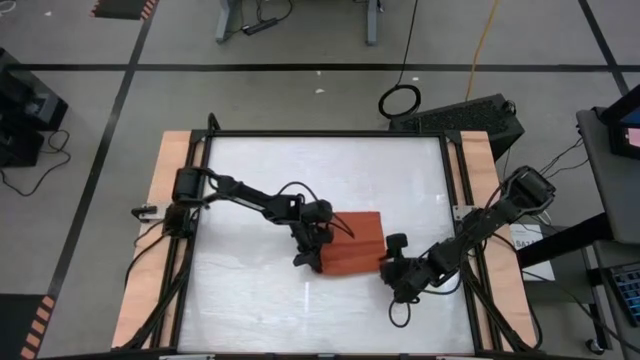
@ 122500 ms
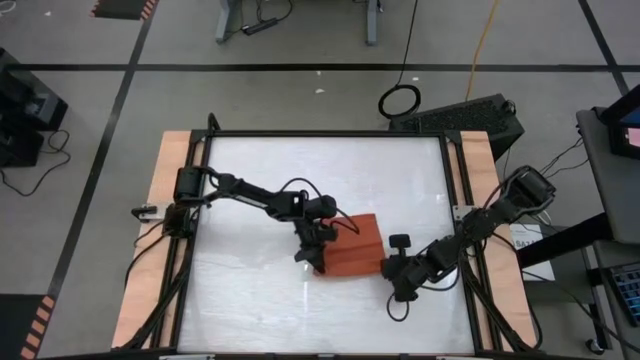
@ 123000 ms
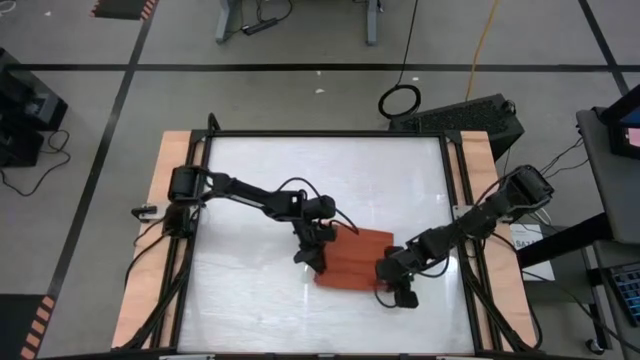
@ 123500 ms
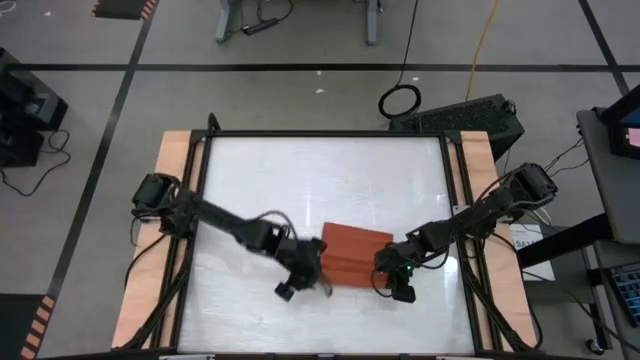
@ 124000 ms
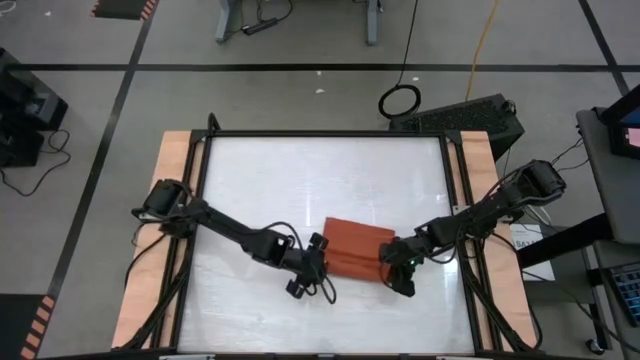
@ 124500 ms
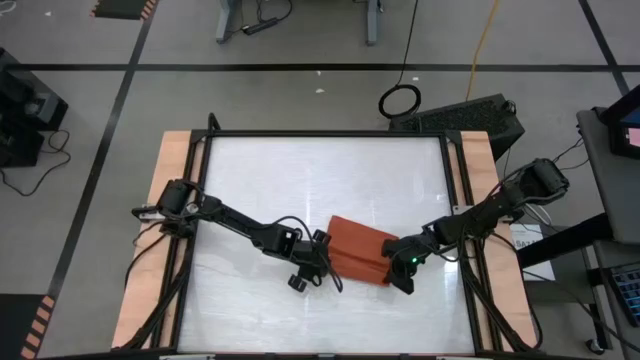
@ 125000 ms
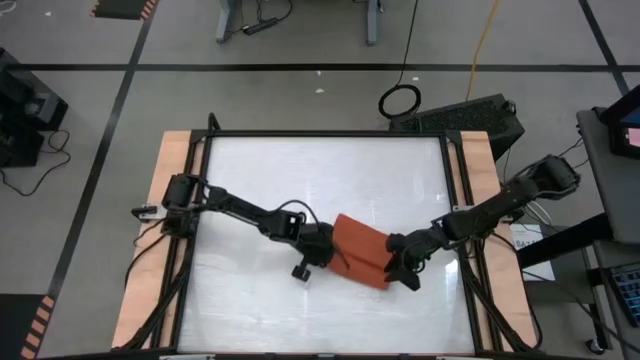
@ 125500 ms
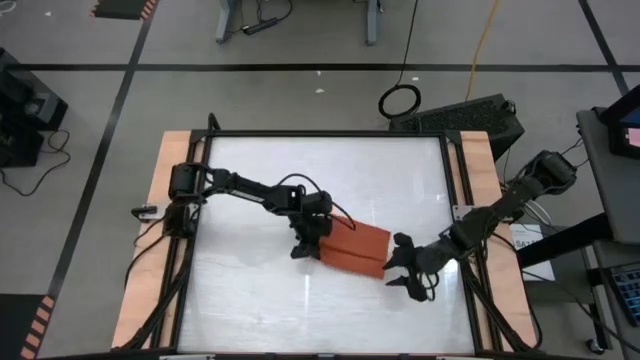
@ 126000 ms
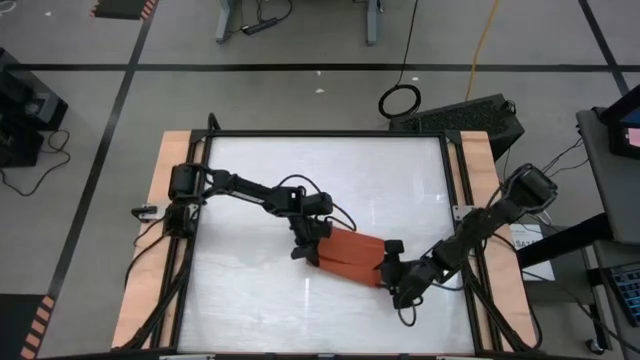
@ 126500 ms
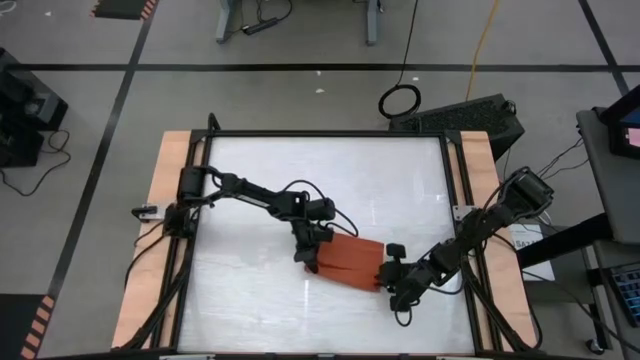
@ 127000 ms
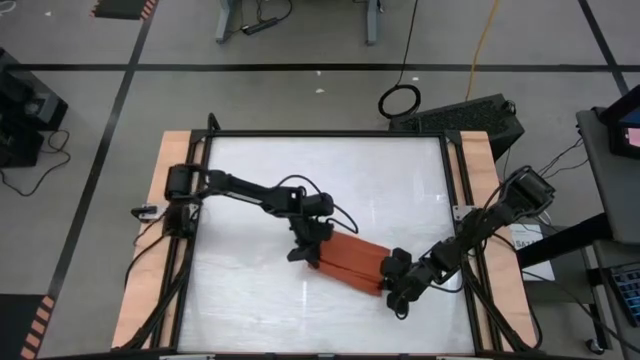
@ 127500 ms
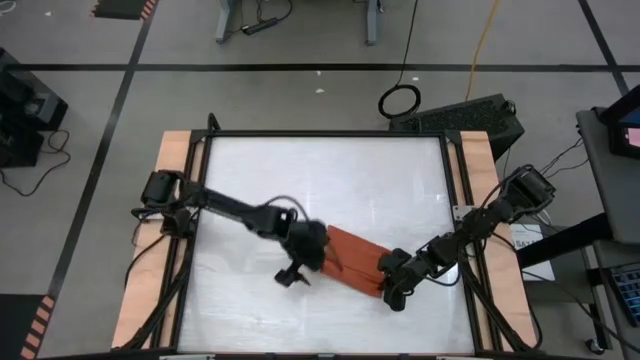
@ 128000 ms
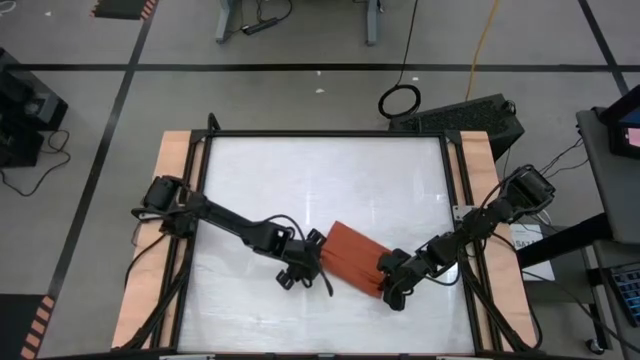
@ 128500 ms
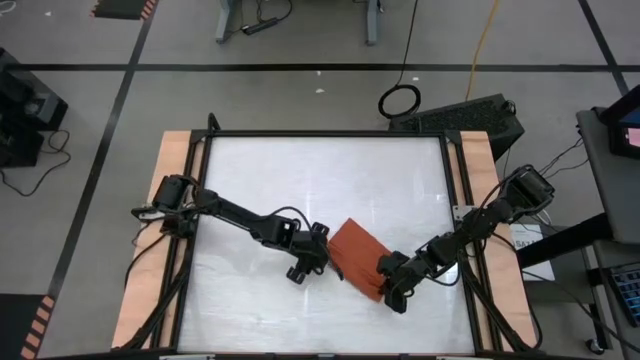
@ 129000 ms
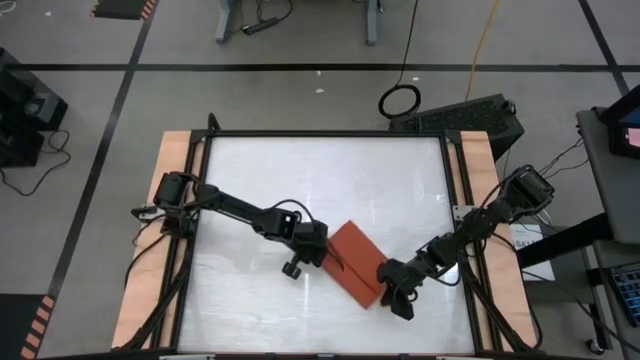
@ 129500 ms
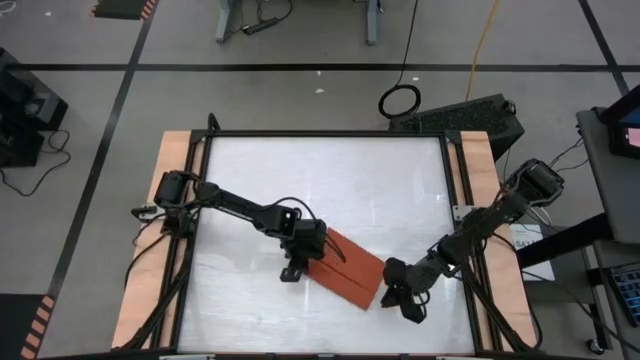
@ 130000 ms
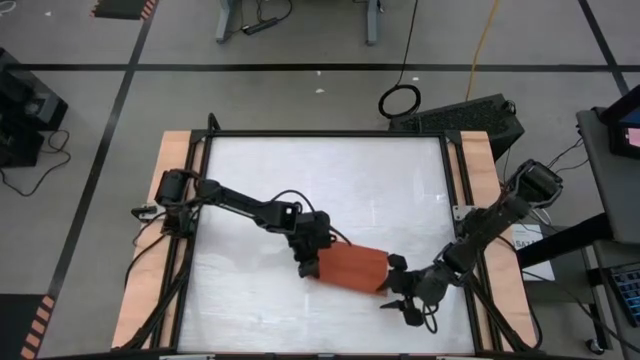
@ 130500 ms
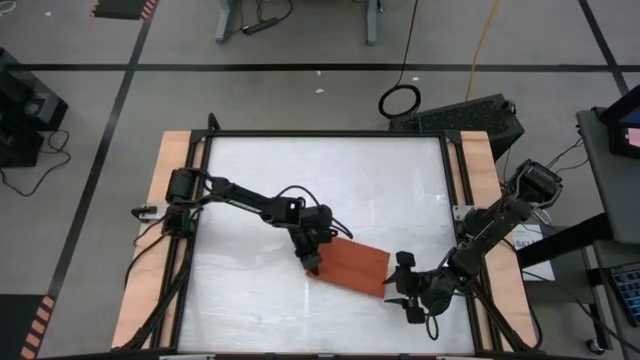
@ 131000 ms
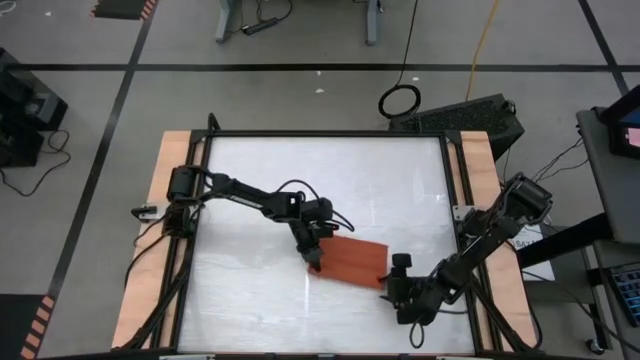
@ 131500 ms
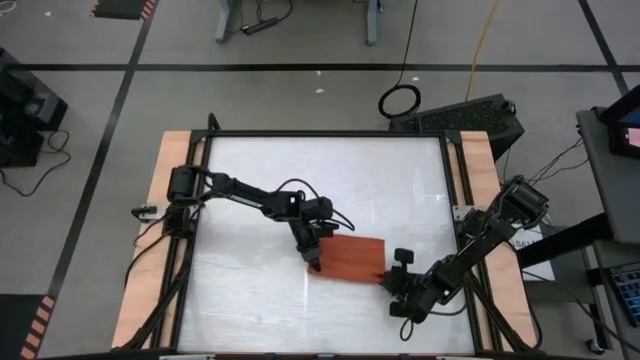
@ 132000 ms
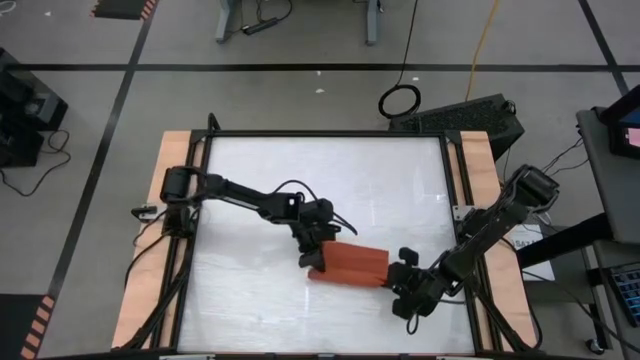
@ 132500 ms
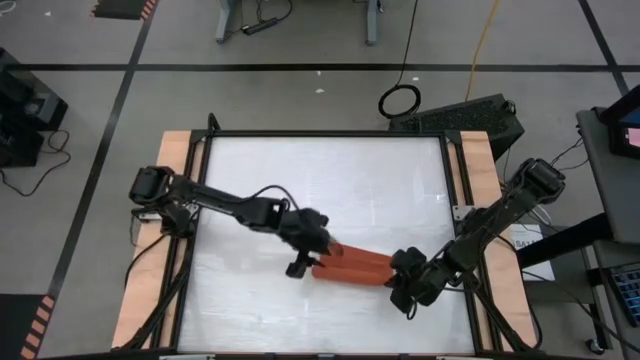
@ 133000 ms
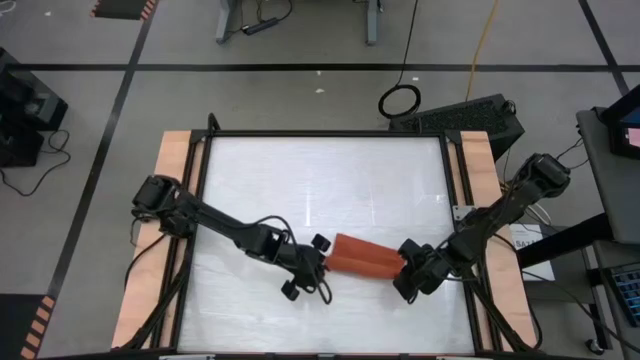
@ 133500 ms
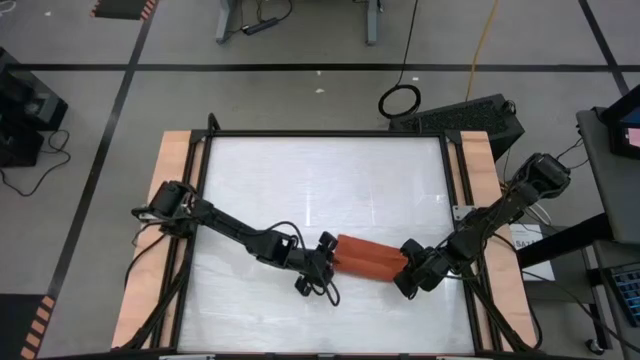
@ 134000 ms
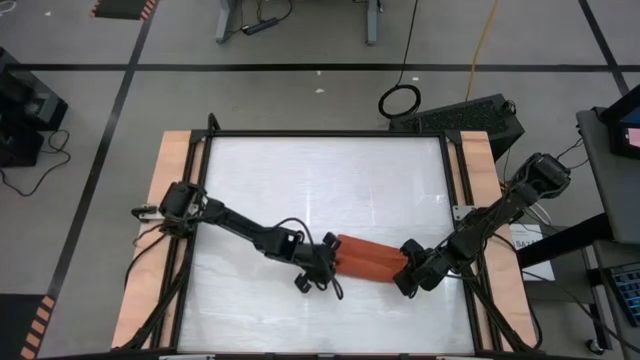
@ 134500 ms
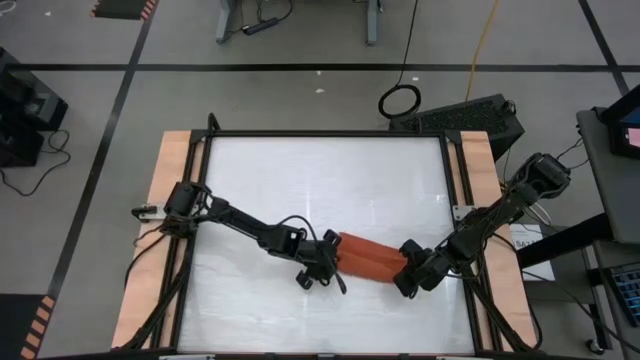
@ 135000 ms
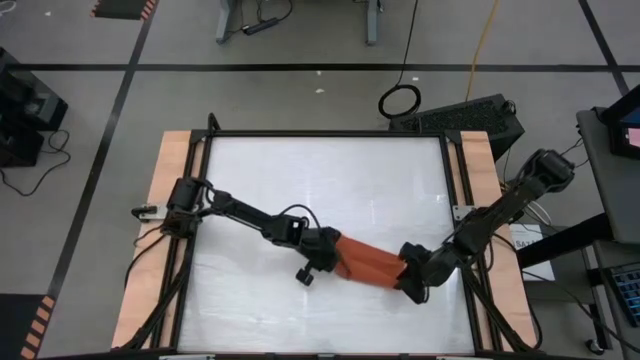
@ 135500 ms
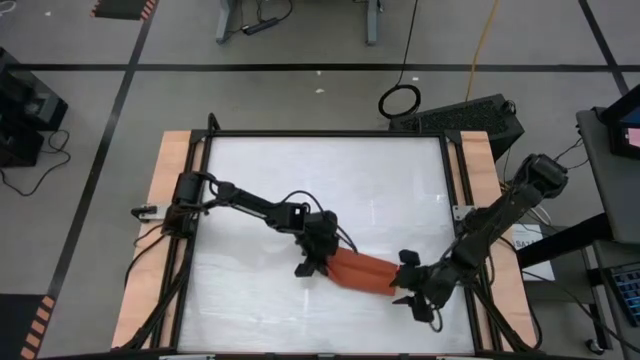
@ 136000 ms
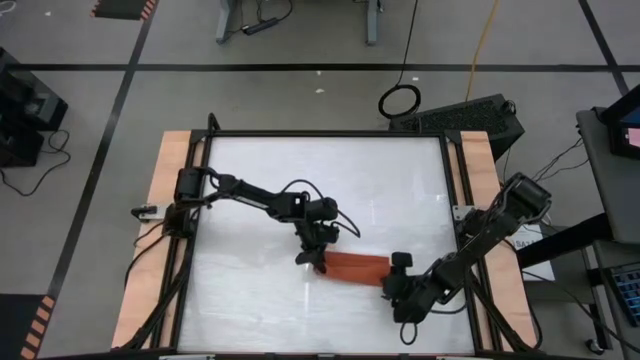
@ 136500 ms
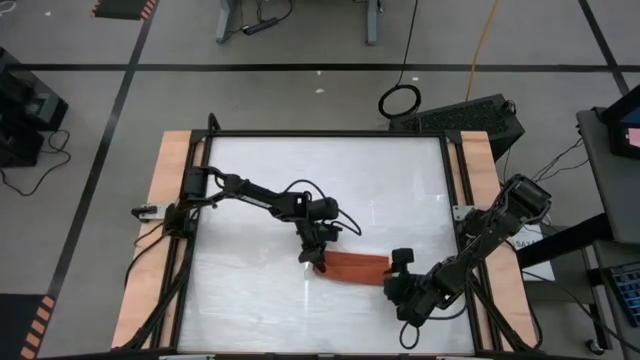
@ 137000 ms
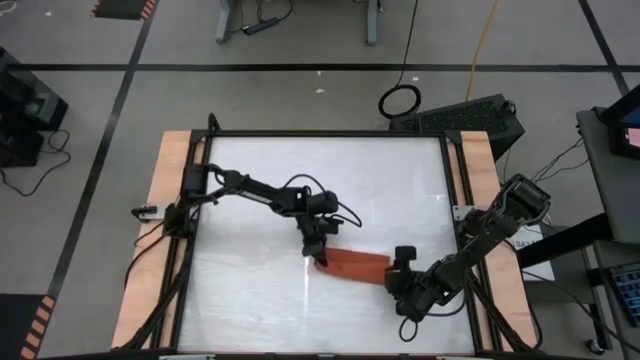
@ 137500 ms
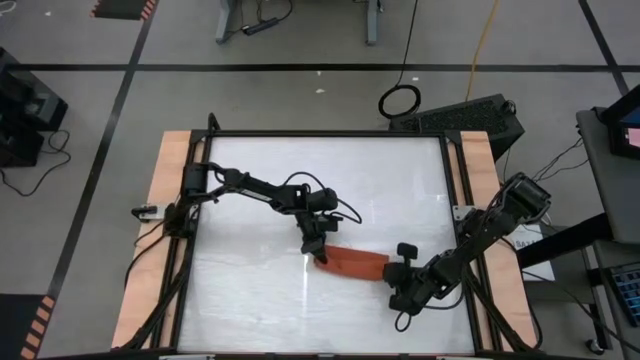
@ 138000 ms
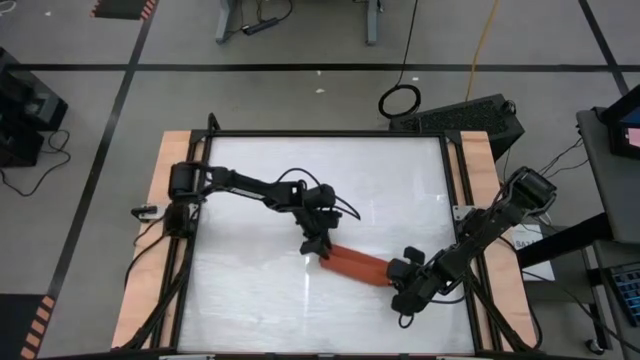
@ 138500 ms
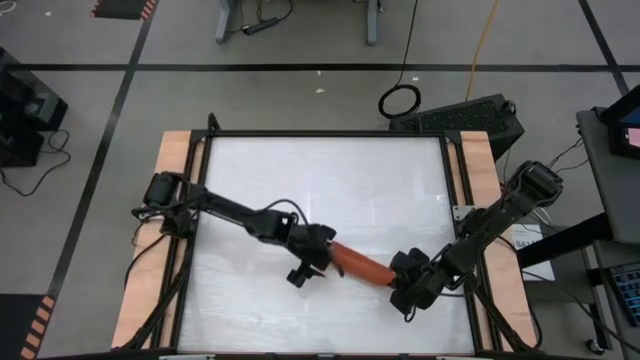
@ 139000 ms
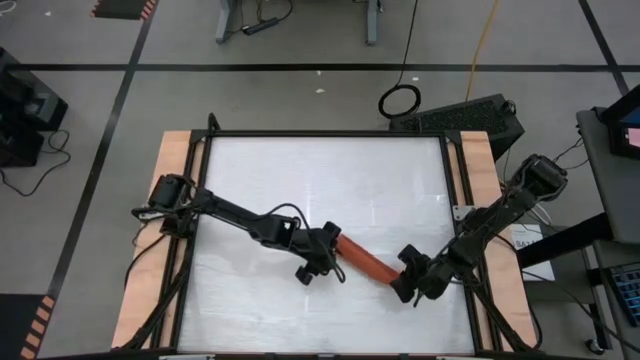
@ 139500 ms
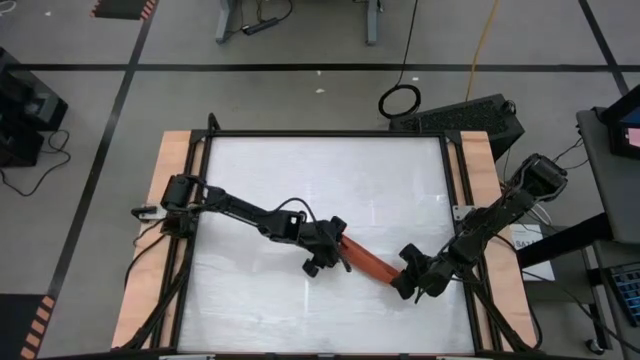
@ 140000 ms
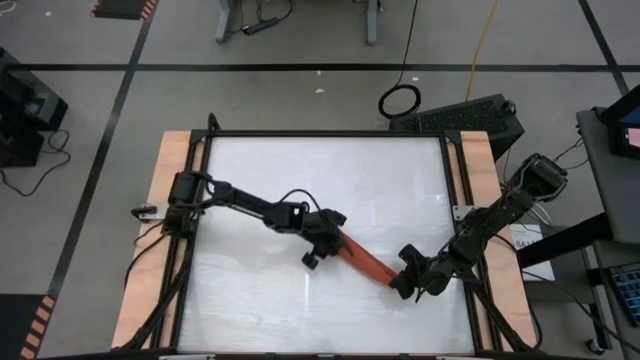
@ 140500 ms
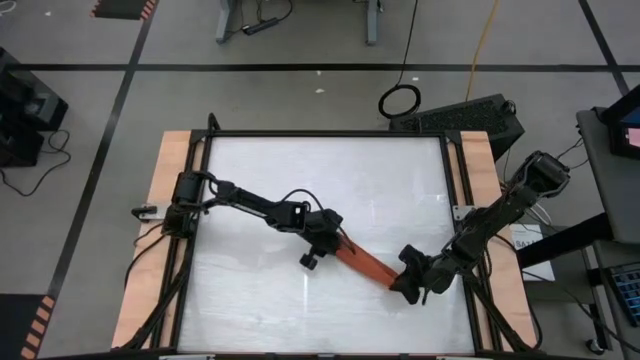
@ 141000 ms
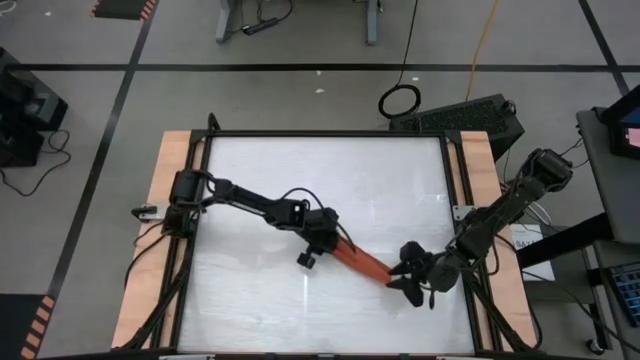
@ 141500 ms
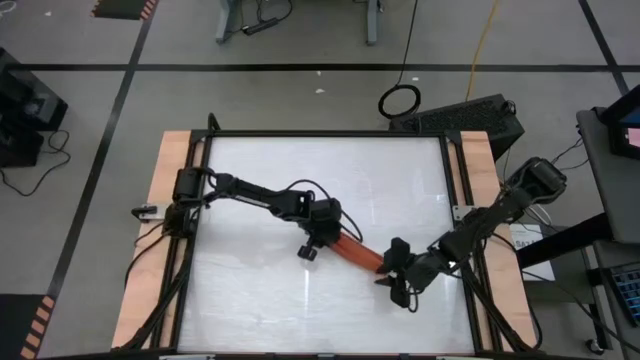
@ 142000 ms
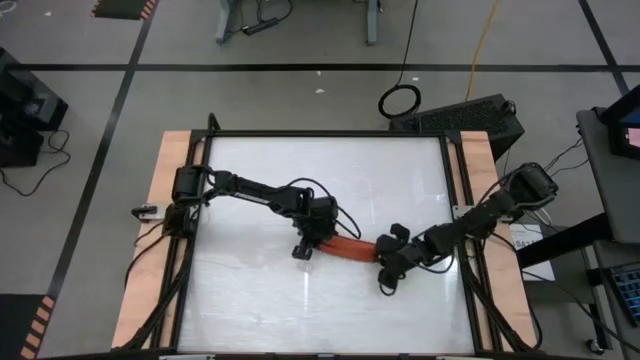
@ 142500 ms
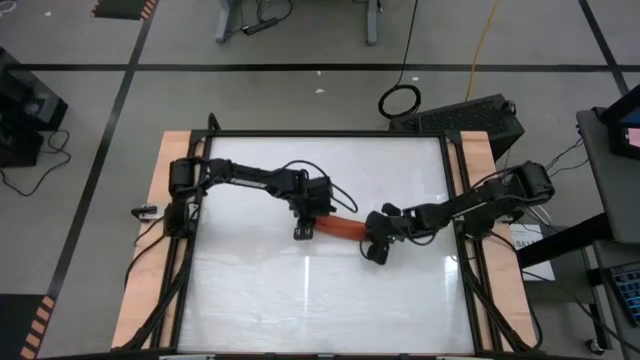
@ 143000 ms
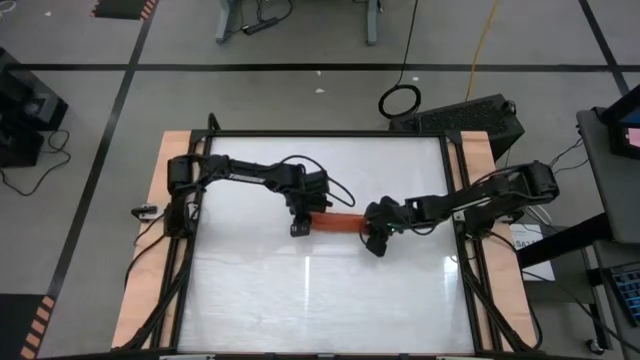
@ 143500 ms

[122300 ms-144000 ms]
Task: Roll towel into tight, uniform cylinder
Roll the kitchen towel
